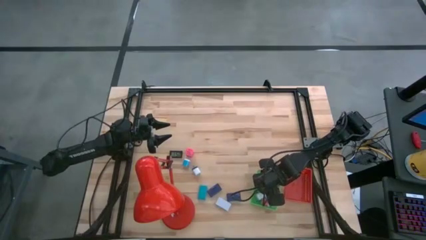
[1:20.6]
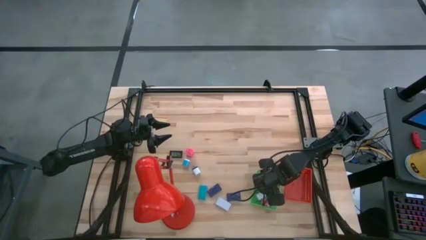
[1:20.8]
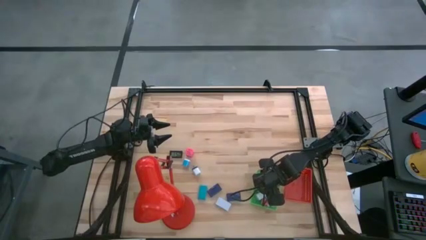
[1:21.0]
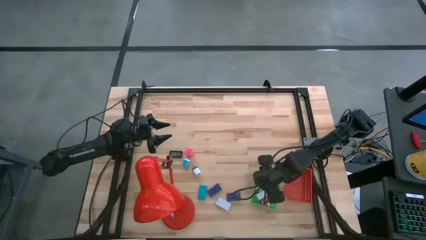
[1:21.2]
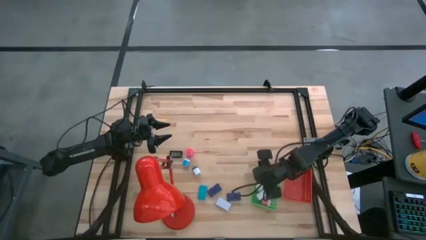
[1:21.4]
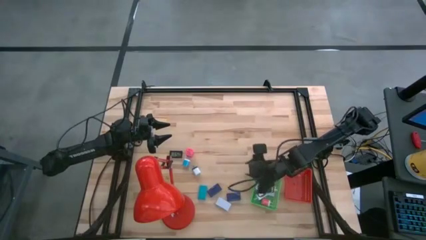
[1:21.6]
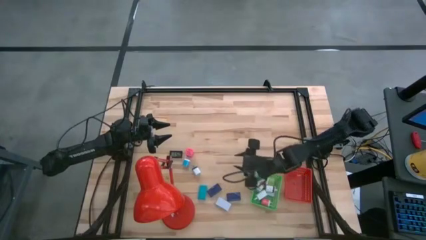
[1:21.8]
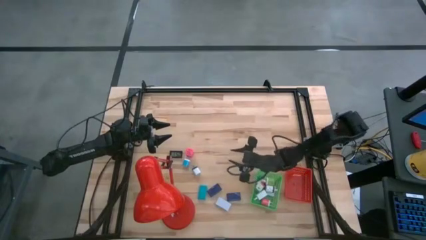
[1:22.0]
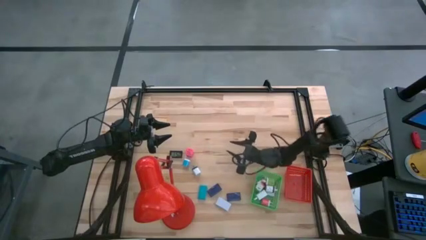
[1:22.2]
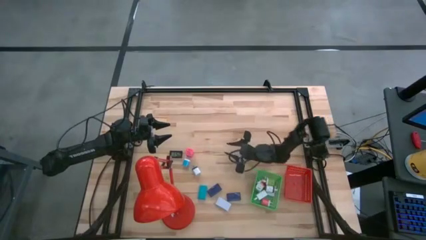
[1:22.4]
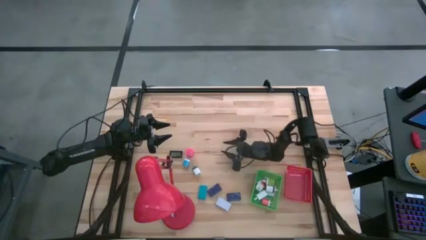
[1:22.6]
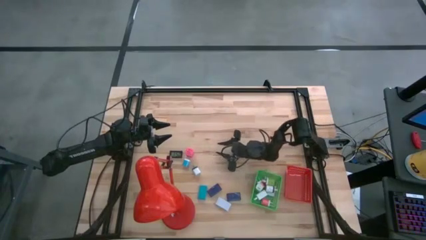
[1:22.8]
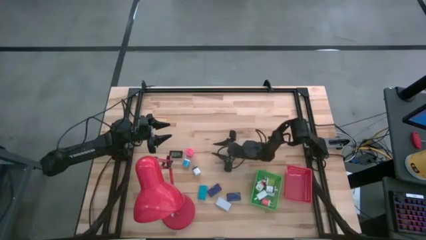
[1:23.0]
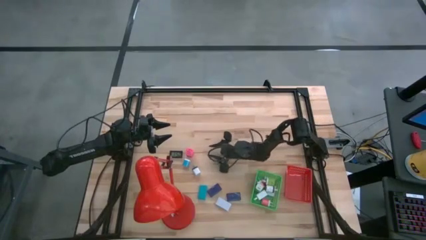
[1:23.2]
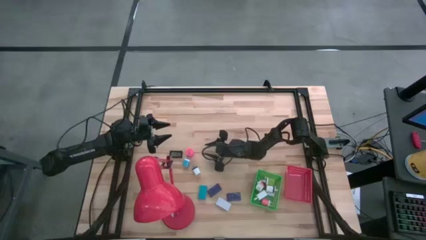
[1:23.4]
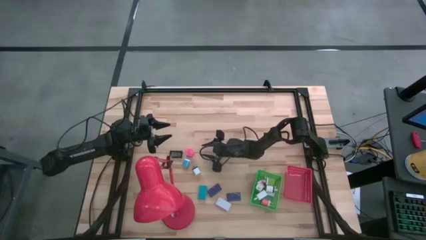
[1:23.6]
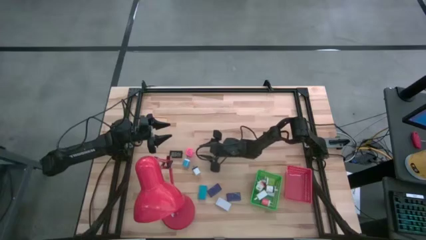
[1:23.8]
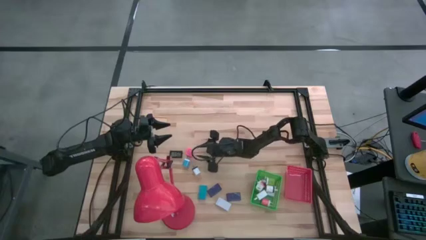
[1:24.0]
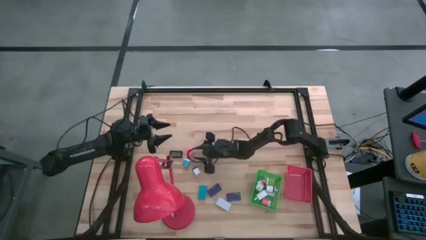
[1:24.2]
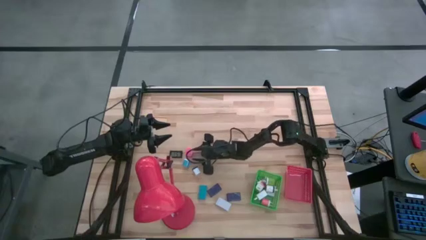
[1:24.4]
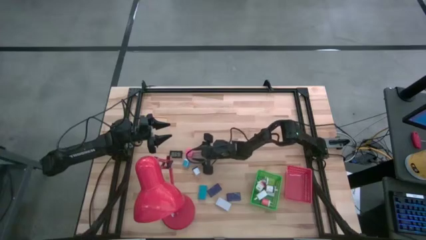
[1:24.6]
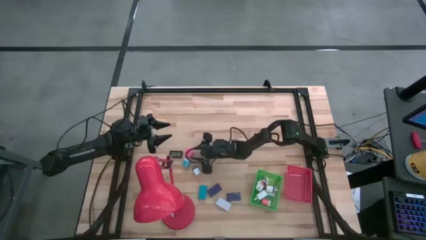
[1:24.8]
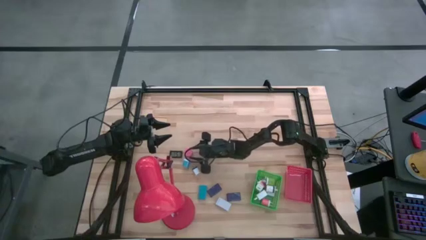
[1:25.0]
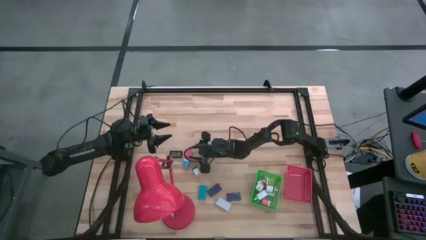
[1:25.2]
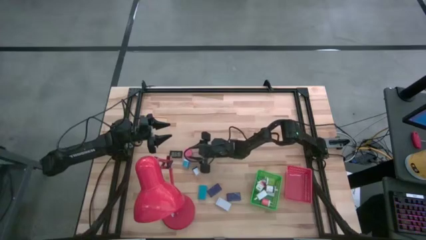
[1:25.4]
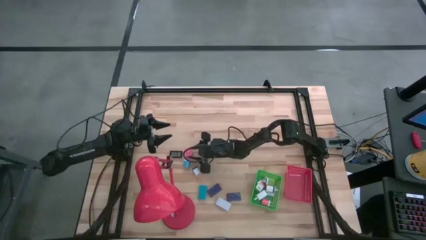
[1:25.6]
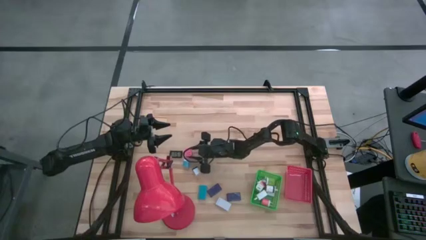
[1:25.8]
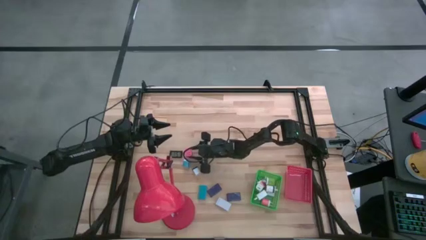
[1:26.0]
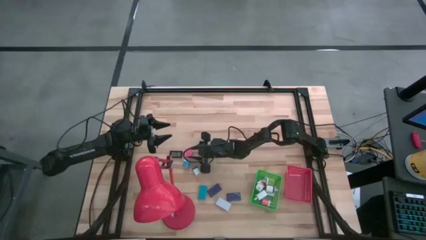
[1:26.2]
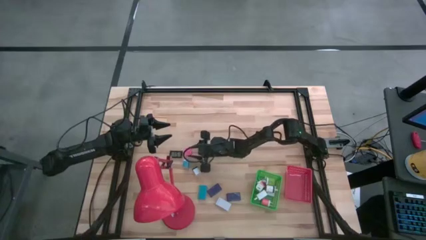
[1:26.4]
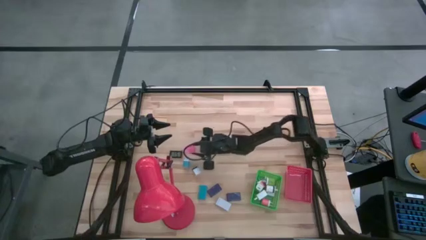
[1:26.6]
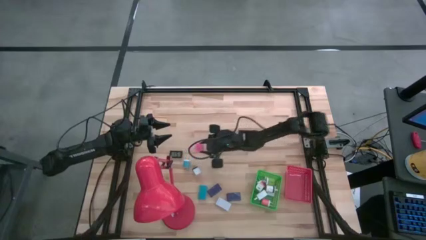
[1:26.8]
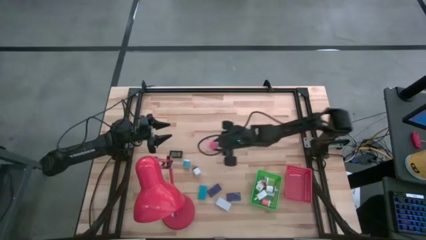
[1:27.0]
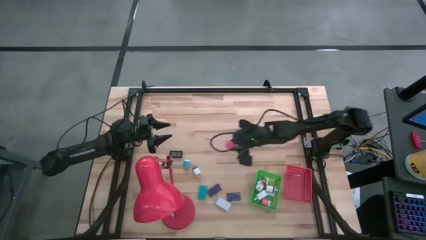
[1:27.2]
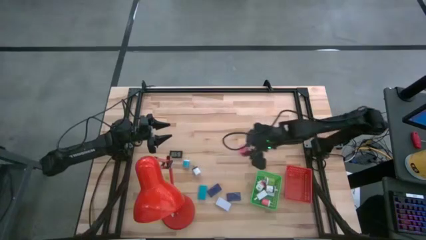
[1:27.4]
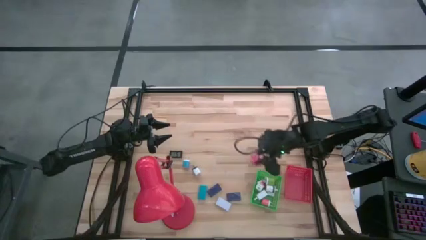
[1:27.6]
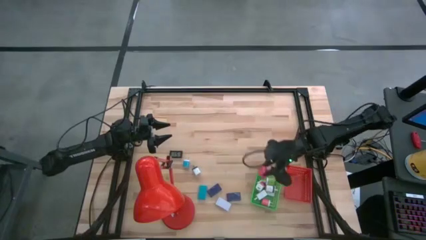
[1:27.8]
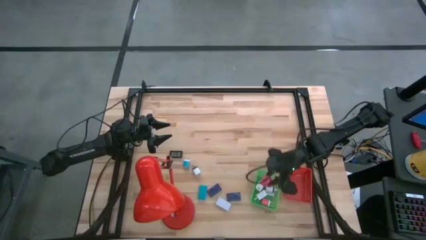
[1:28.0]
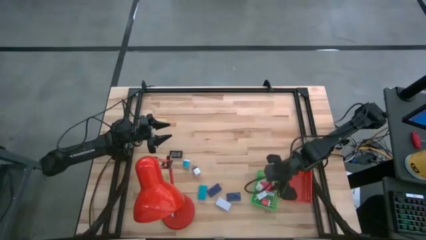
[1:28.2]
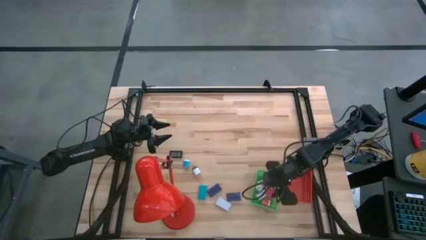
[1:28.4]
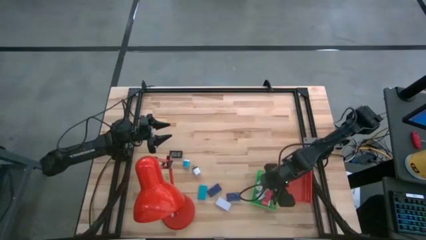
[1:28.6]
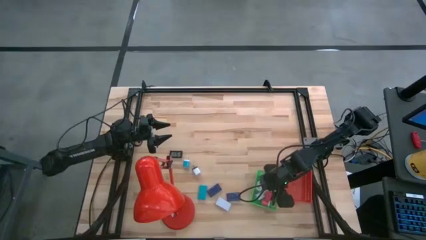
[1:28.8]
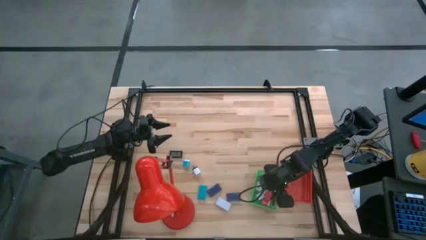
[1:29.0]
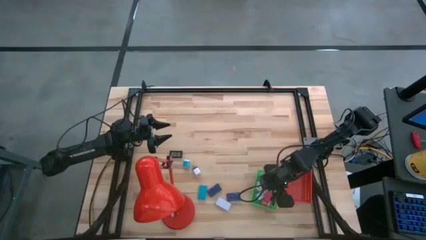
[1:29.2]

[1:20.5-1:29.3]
Task: Pick & Place Office items
Put the pink charger adapter into the green basket

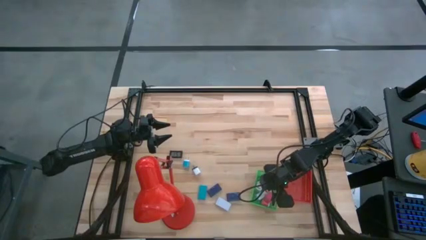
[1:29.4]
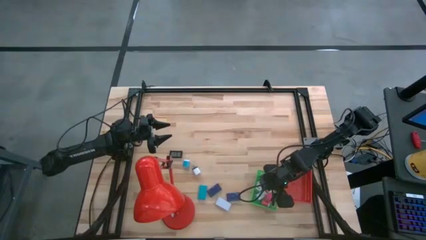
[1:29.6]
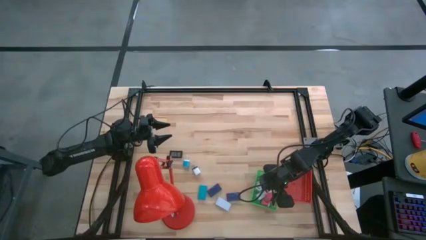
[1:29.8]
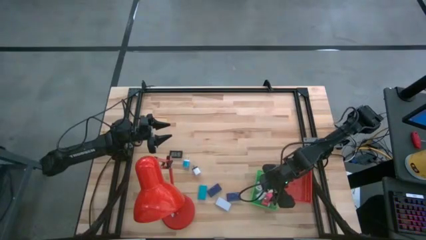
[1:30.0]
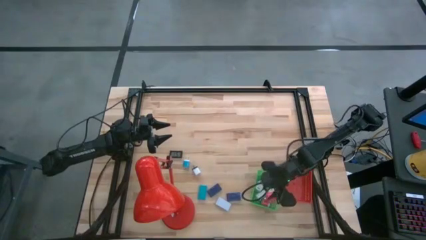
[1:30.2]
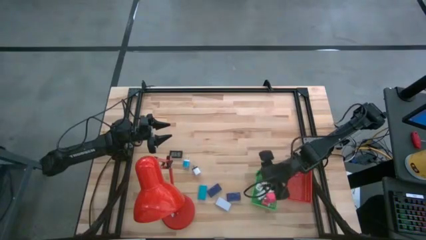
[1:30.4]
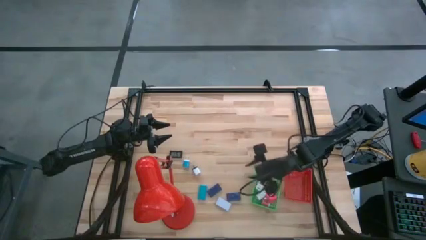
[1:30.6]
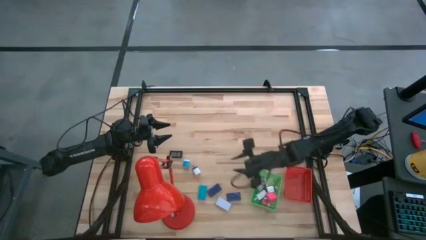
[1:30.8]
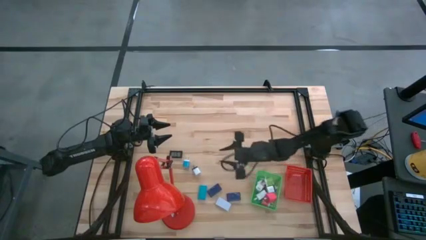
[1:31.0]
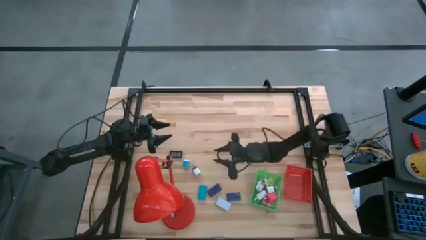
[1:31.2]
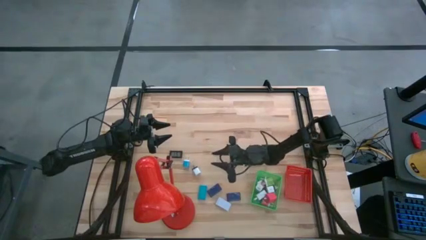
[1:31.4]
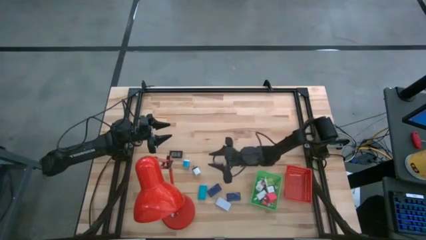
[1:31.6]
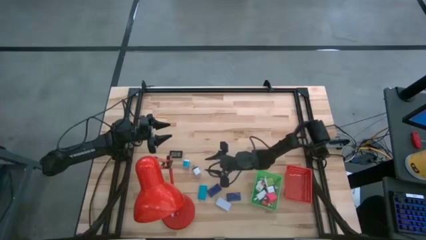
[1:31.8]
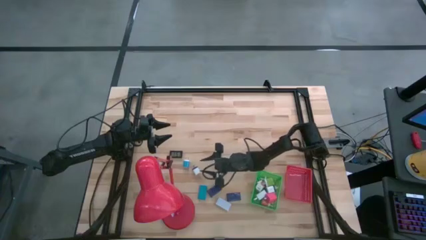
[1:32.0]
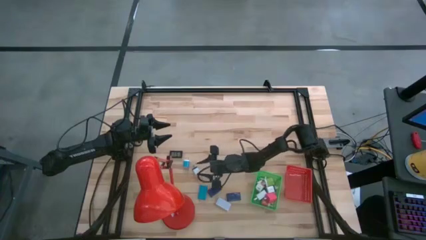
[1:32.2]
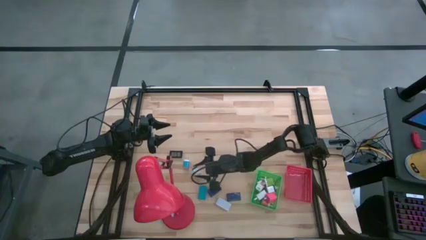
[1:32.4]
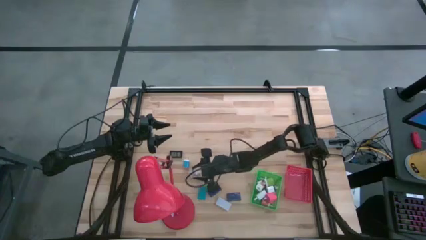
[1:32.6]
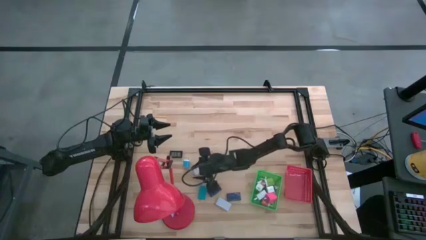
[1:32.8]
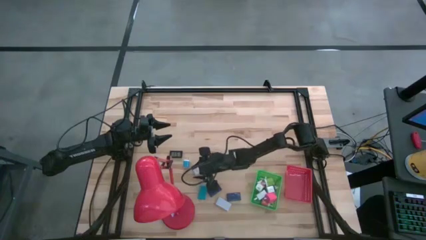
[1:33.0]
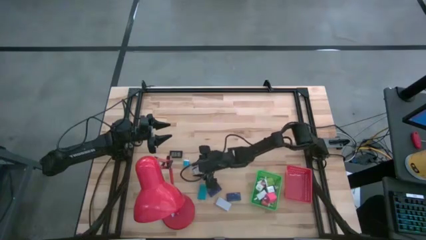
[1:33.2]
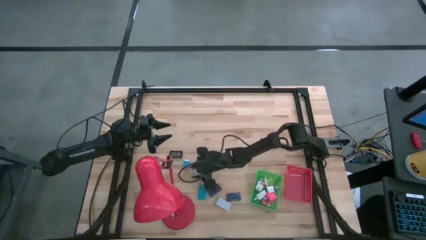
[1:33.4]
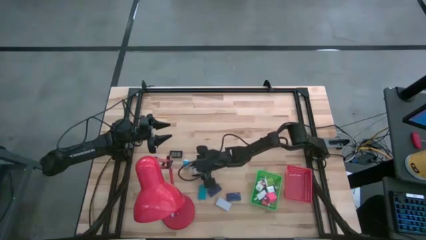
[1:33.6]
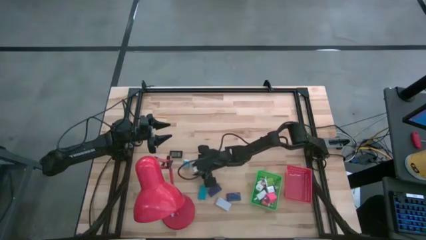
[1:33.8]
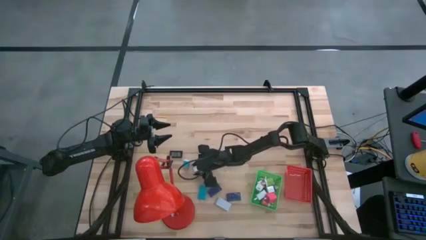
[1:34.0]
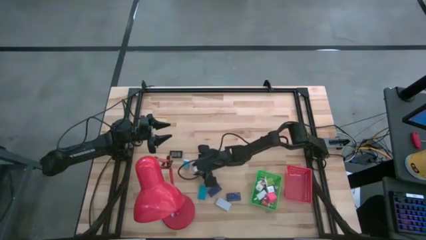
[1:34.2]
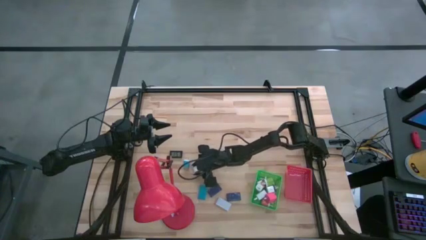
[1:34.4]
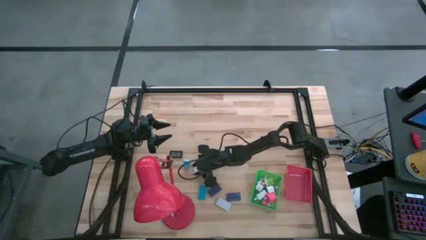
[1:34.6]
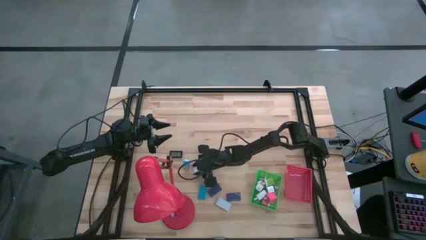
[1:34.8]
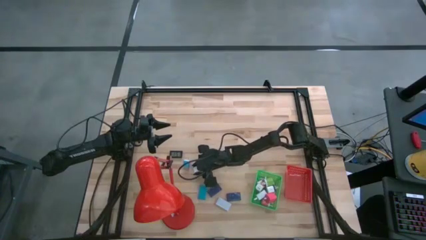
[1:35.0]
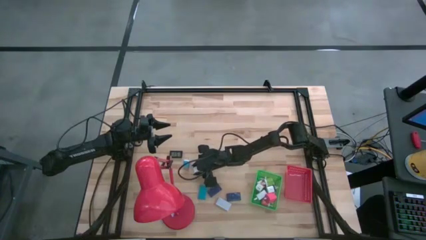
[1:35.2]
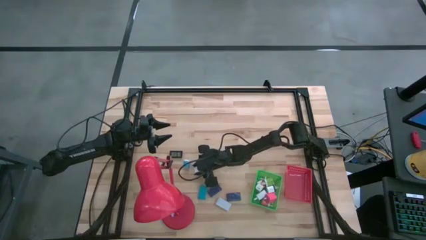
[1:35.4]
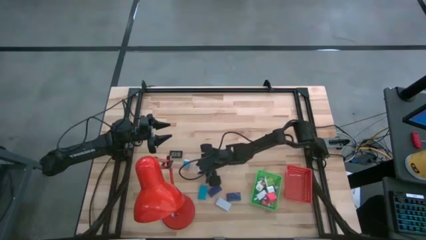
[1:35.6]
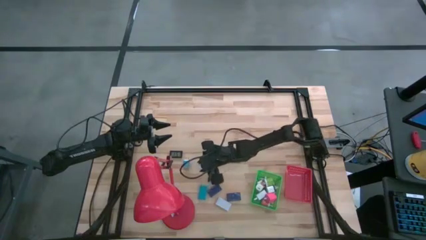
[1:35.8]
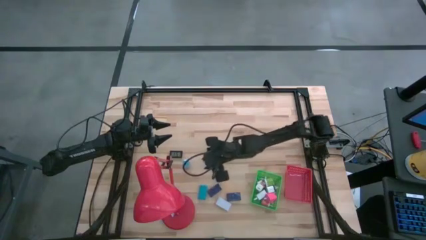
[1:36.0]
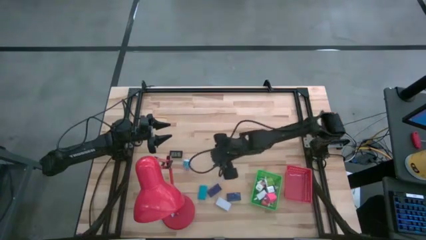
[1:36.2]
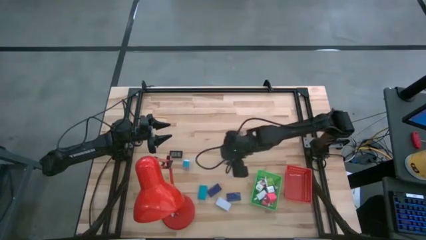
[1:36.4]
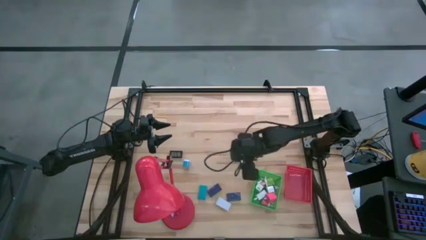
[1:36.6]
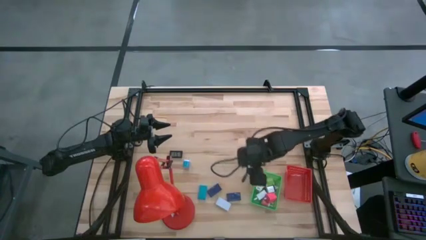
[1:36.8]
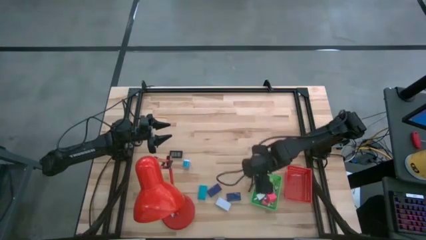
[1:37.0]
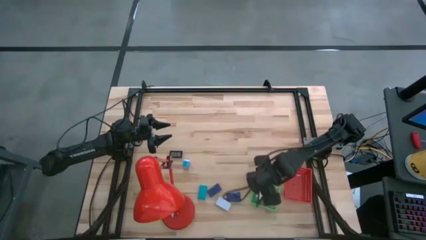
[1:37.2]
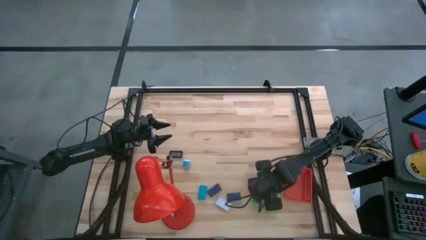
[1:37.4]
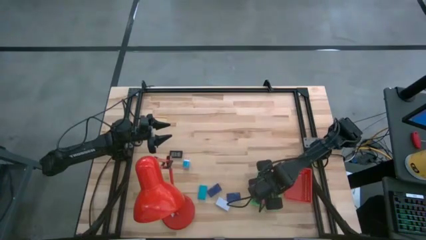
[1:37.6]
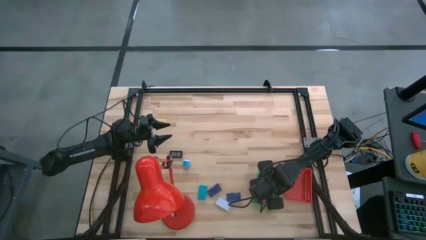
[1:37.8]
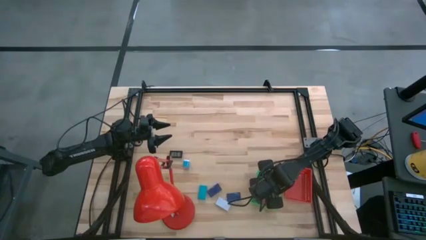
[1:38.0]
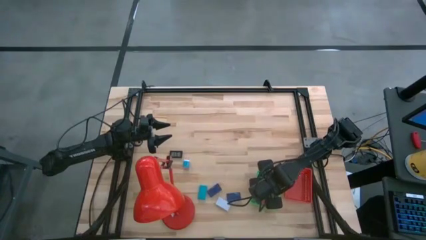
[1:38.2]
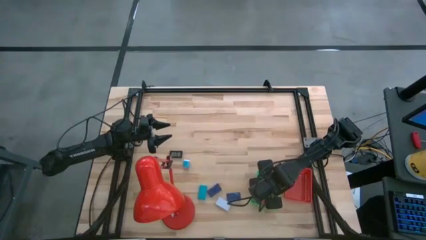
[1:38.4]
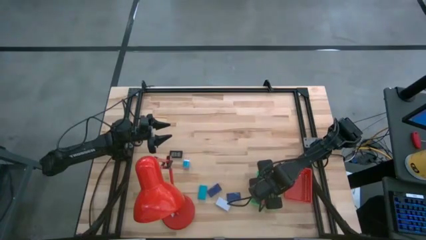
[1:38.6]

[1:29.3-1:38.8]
Put the white charger adapter into the green basket
